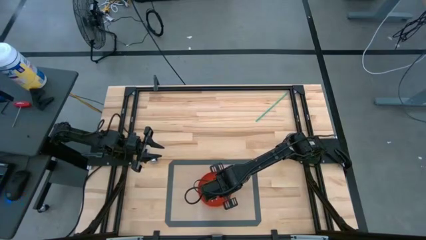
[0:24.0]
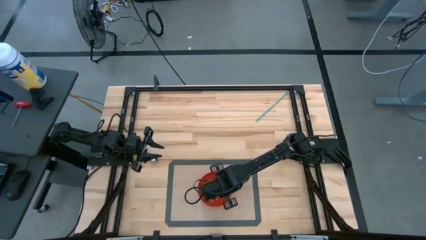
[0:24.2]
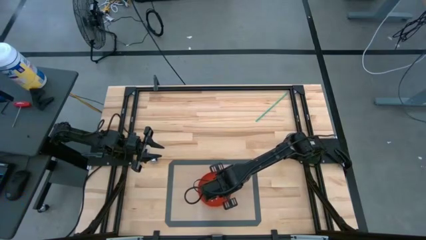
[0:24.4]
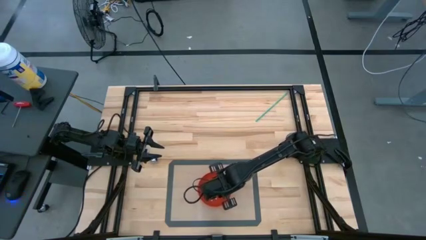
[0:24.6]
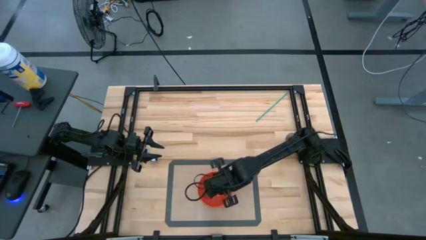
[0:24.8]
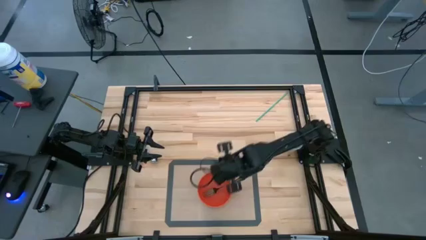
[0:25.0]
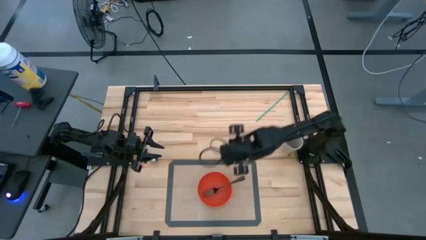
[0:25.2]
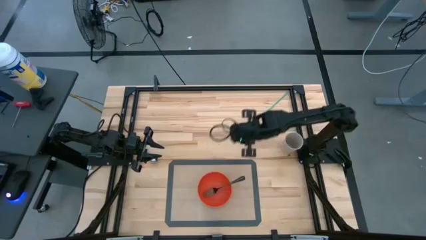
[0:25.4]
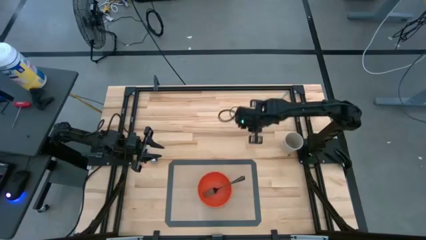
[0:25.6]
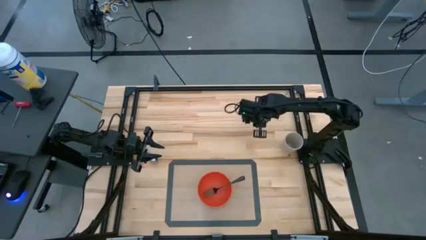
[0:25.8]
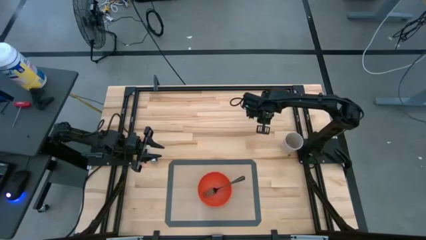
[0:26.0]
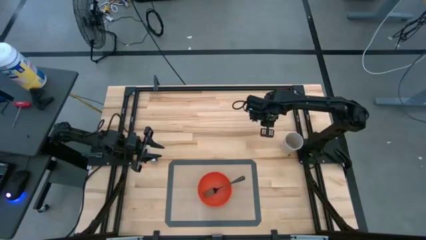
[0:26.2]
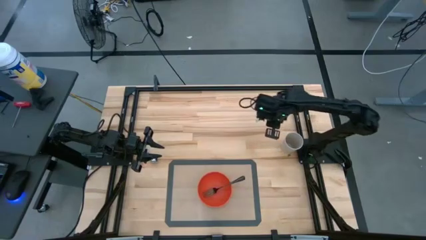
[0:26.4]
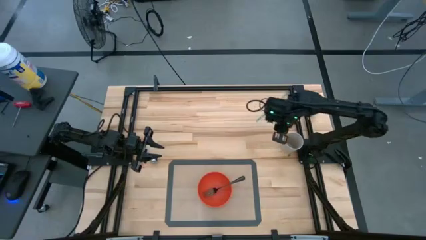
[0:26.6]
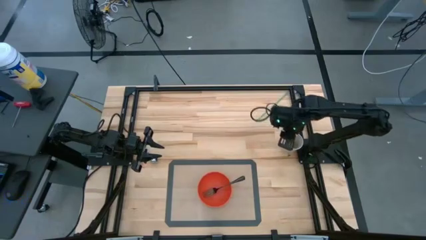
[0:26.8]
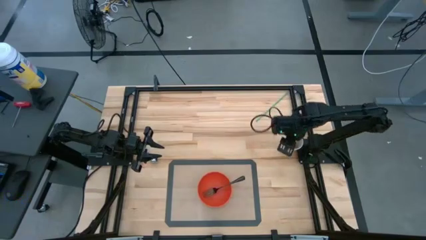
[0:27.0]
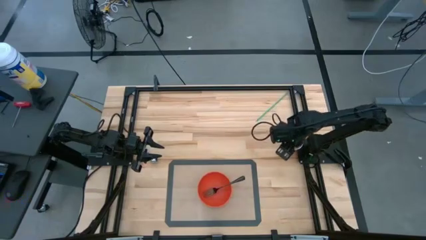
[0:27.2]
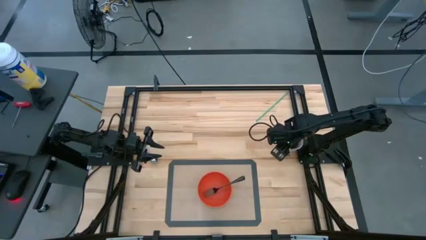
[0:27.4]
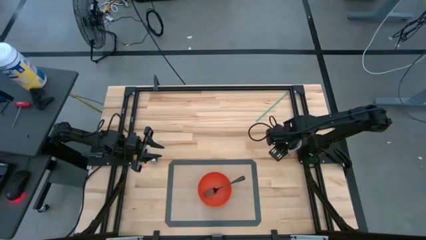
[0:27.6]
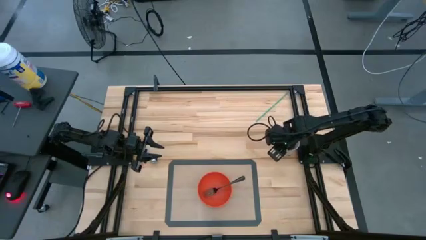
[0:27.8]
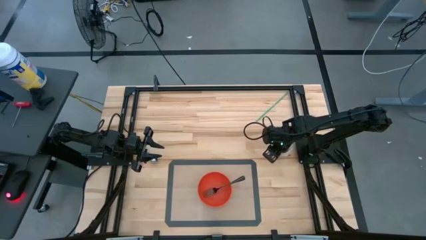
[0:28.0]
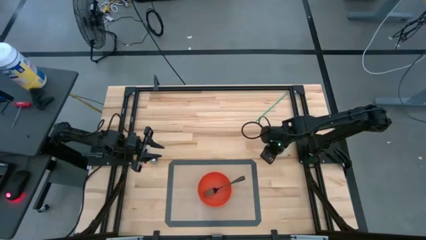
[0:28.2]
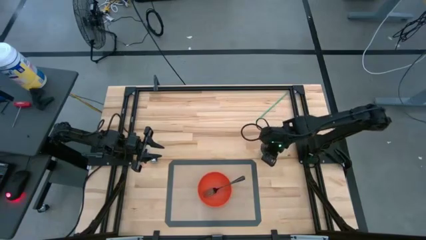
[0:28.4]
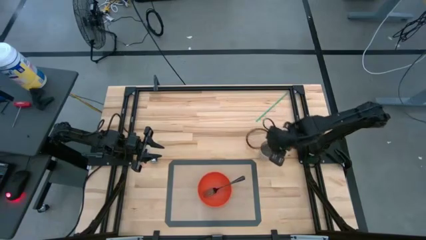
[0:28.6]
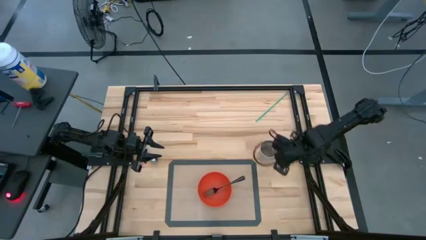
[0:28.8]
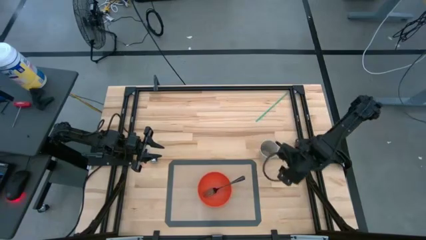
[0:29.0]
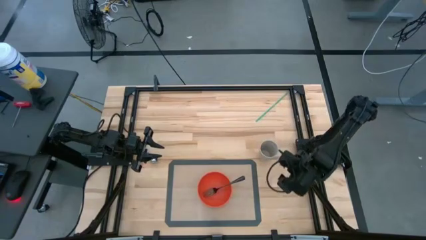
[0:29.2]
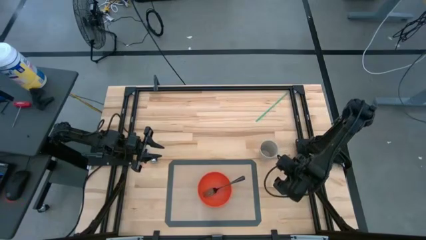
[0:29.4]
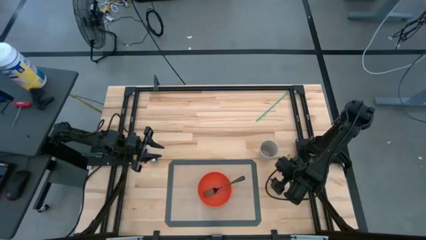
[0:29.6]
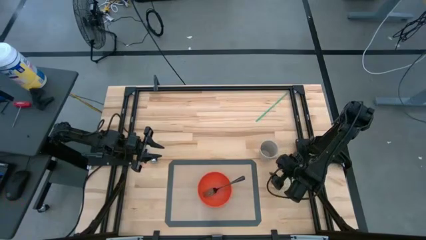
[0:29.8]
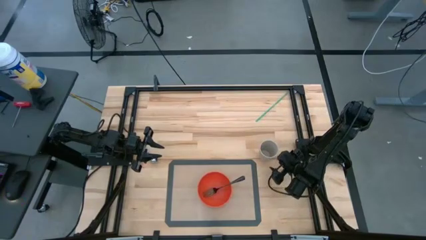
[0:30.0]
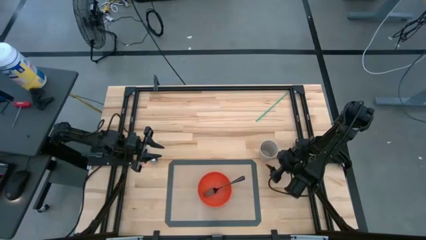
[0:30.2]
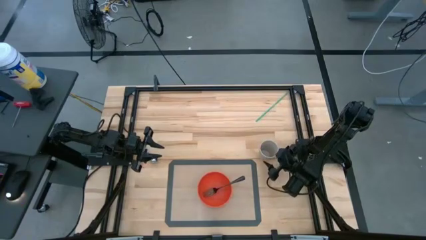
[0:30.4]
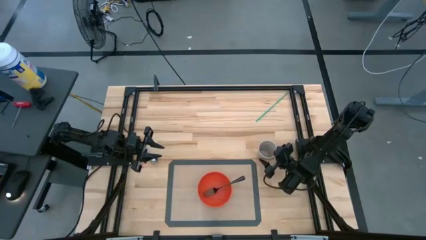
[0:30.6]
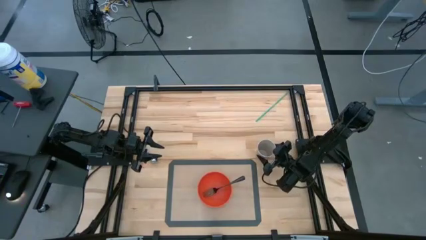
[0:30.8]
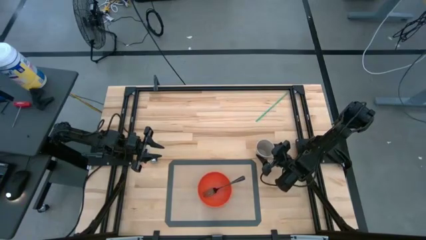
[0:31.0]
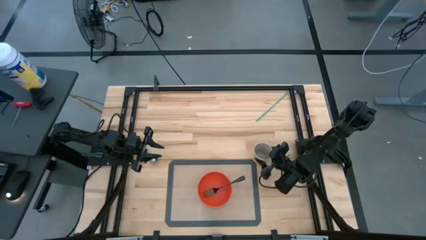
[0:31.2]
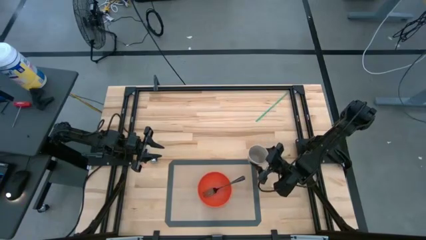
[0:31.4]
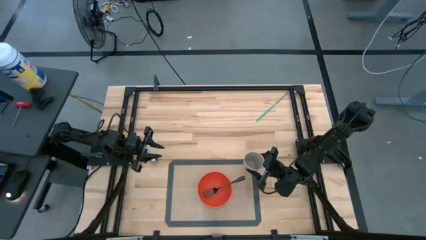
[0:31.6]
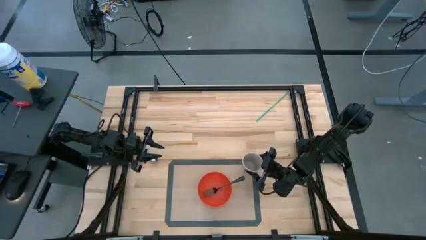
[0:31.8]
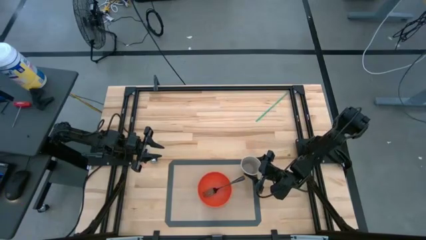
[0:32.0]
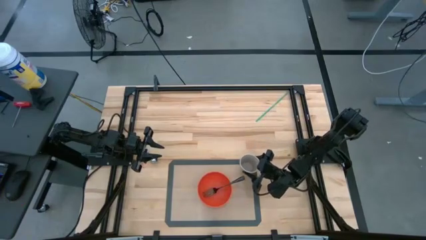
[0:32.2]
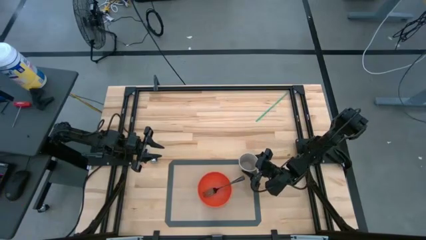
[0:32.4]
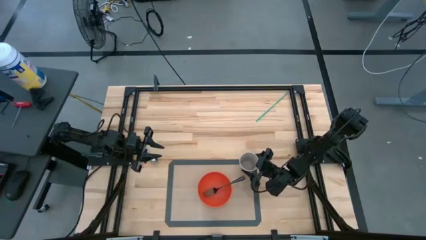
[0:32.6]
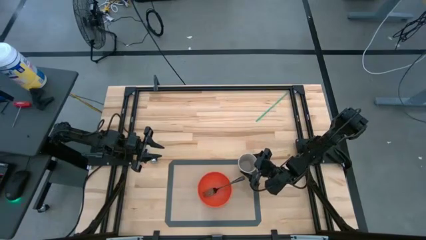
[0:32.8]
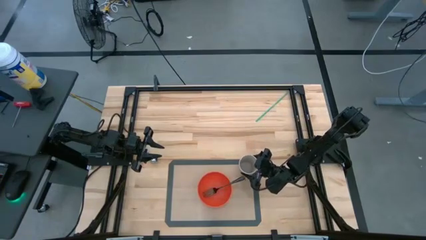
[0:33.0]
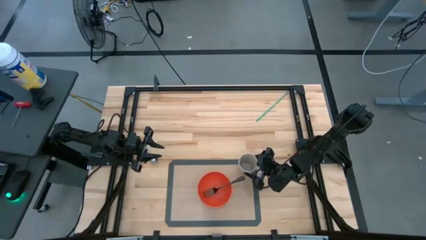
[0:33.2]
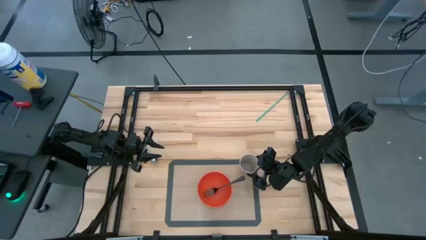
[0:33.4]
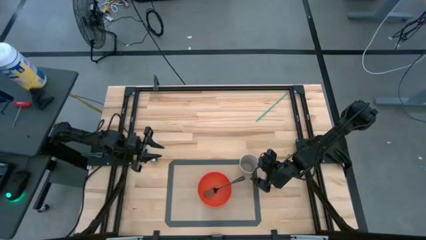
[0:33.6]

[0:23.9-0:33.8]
Task: Pick & Place Utensil
Put the white cup on the gray mat to the top right of the orange bowl

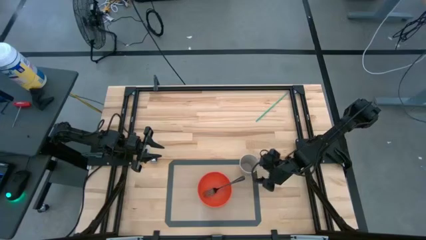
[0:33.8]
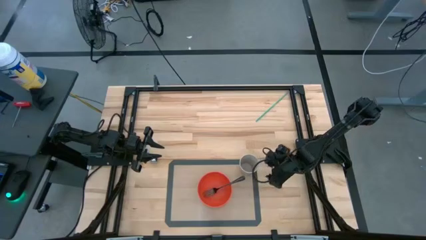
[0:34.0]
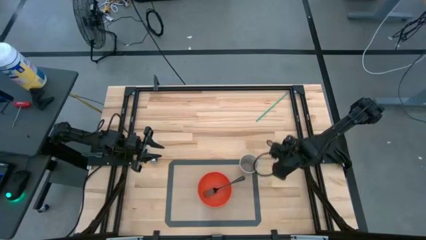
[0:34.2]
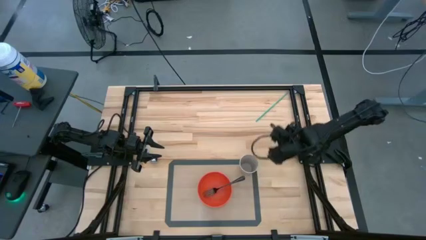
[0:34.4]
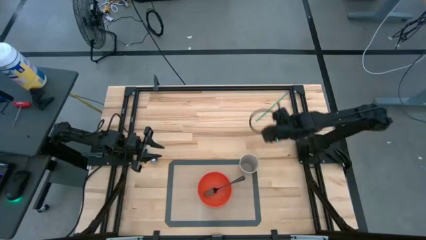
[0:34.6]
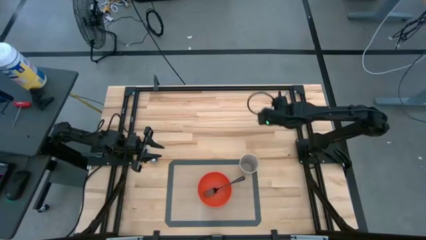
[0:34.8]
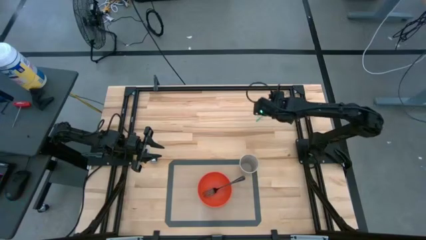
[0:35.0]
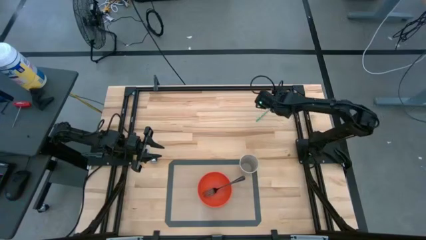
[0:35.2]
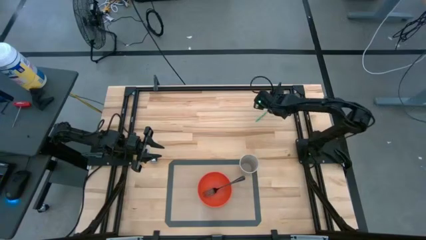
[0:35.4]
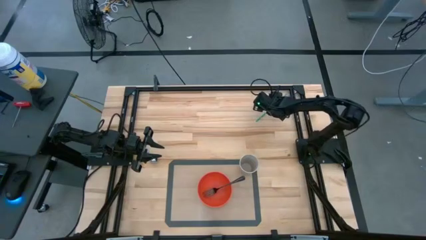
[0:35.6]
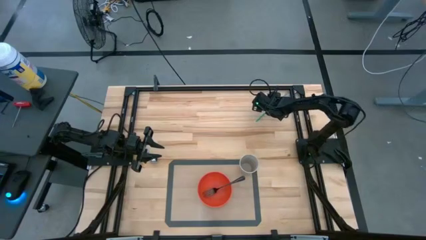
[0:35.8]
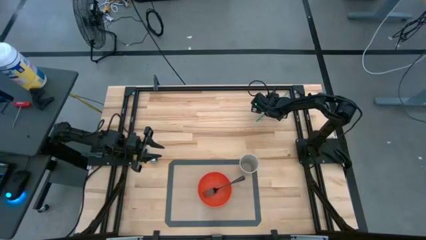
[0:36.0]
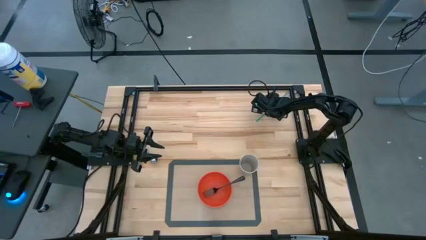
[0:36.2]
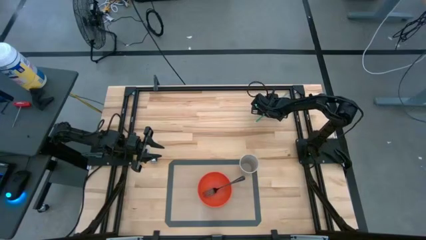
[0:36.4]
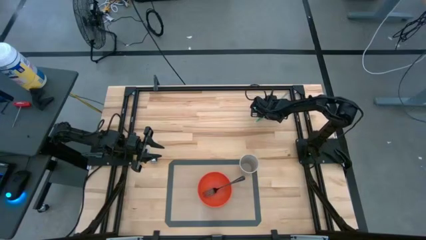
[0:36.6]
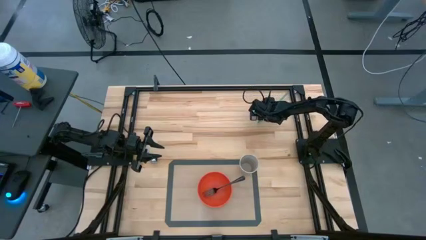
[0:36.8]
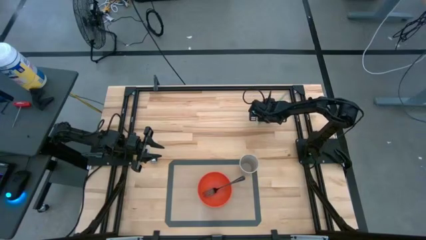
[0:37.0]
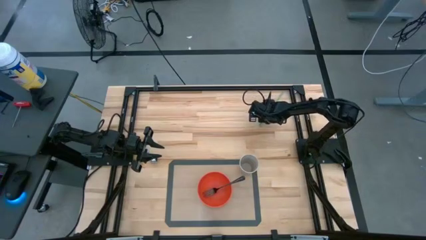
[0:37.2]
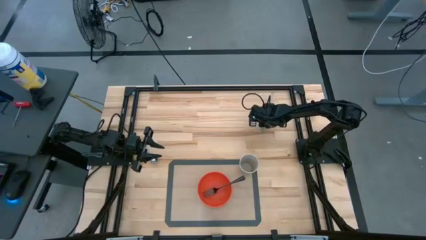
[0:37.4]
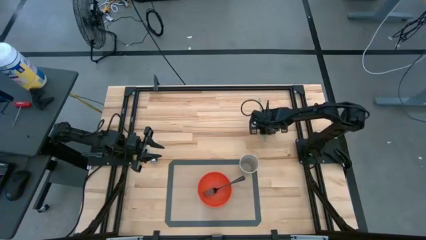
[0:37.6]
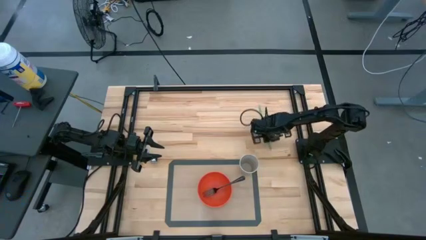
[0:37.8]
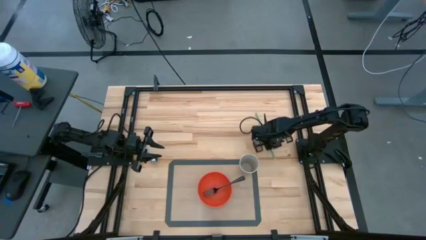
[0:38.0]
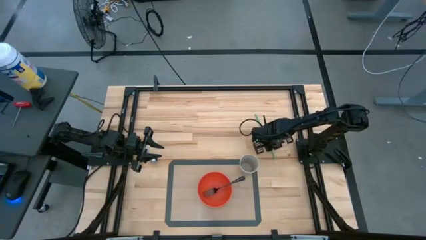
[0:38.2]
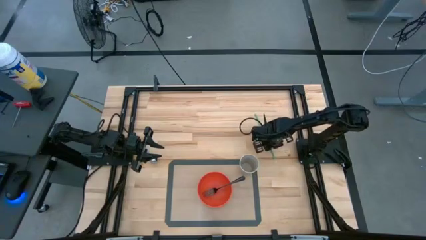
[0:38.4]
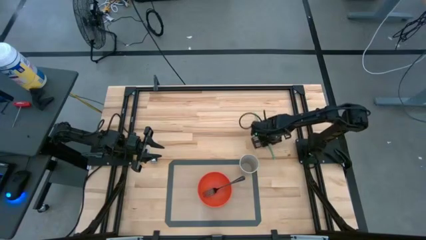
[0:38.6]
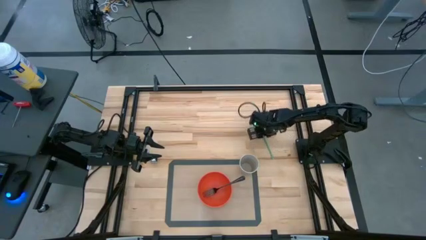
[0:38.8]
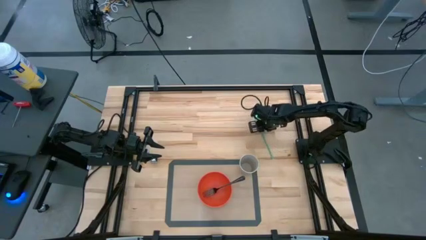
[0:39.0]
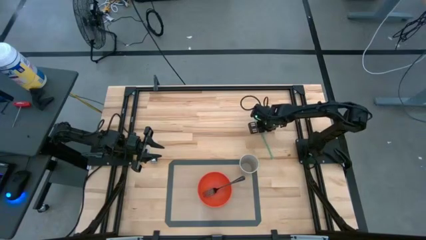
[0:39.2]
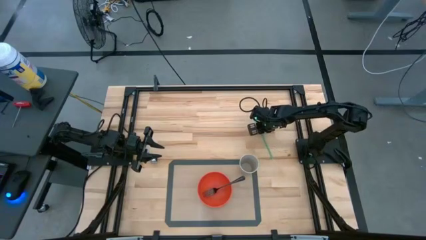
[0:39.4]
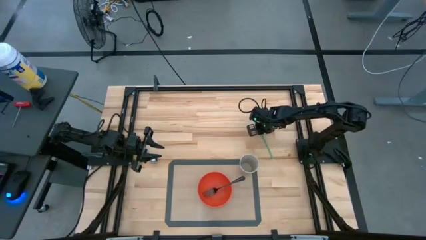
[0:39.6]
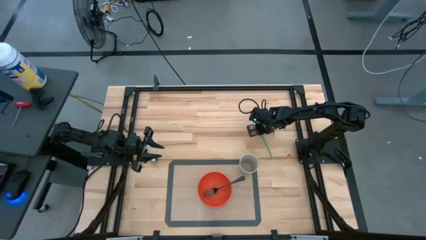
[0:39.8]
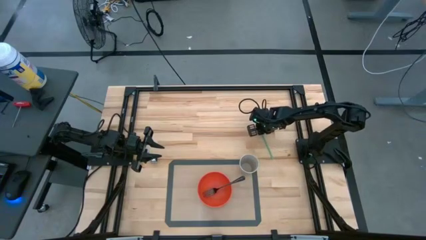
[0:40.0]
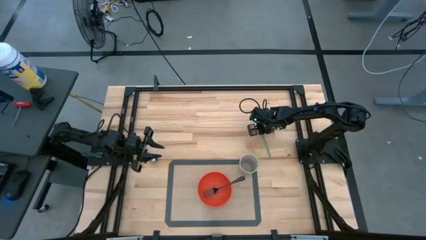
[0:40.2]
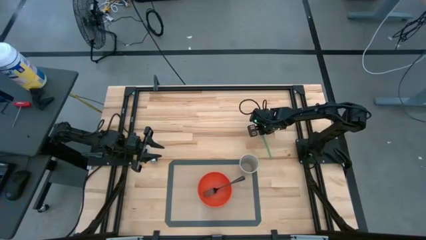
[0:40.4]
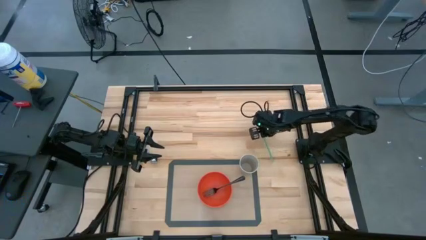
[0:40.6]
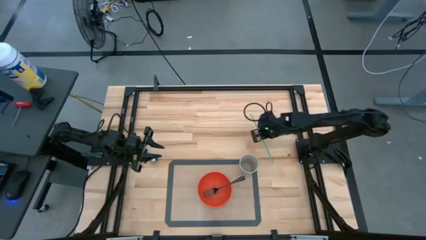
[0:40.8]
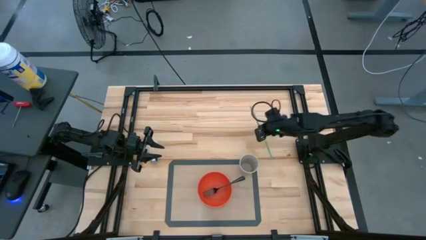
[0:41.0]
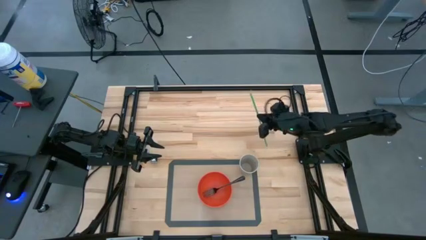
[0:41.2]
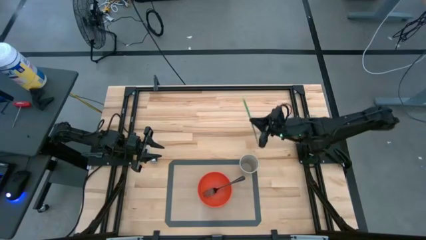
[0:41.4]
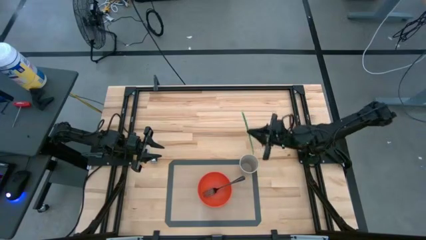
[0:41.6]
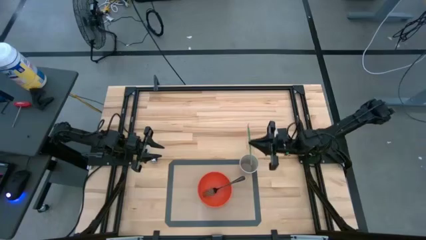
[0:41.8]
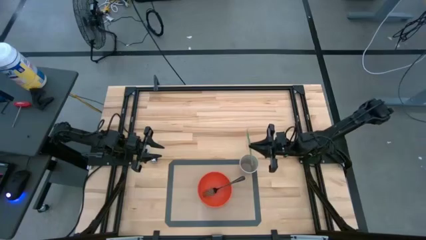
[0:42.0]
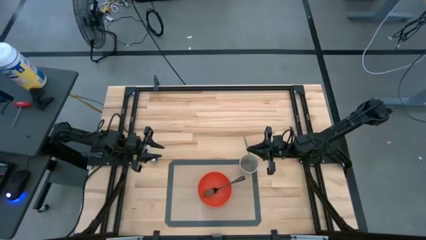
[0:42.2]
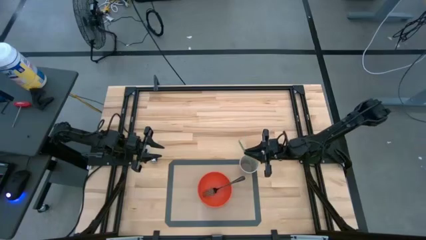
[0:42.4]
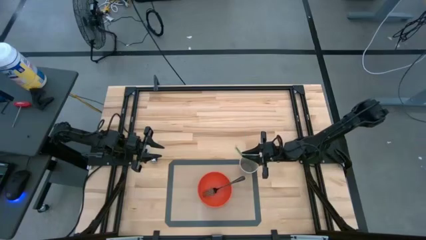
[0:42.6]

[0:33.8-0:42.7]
Put the green straw into the white cup
